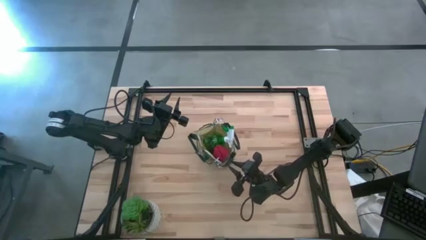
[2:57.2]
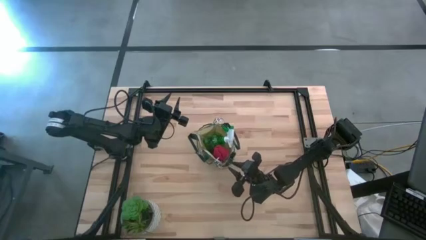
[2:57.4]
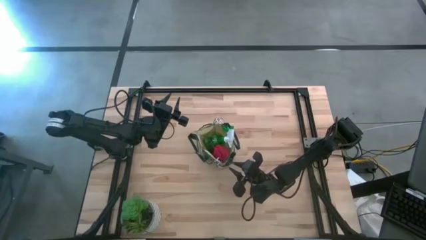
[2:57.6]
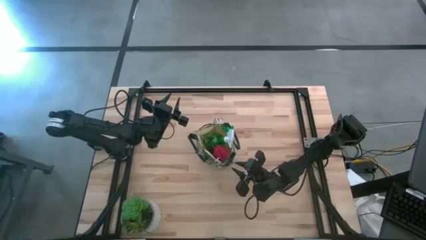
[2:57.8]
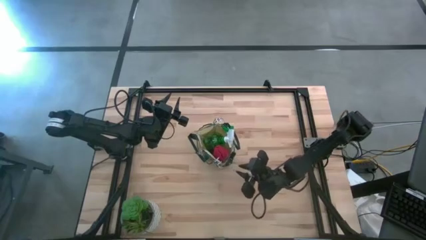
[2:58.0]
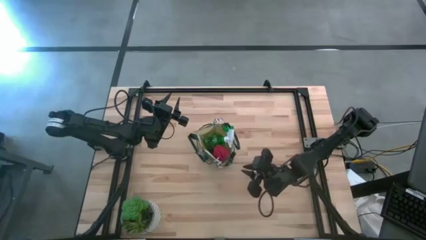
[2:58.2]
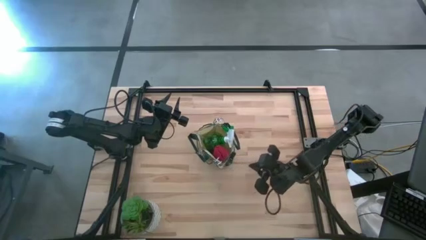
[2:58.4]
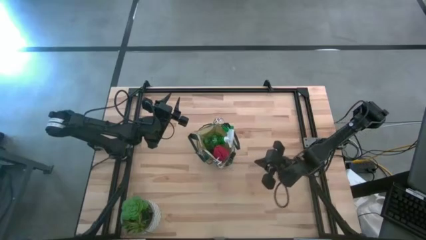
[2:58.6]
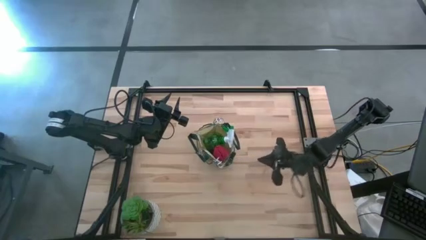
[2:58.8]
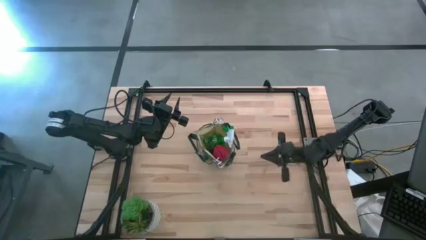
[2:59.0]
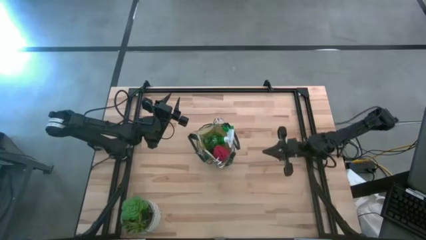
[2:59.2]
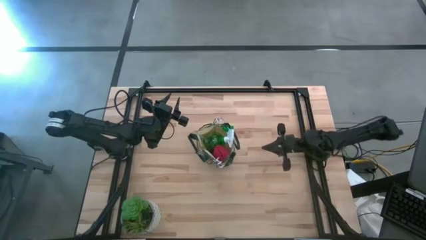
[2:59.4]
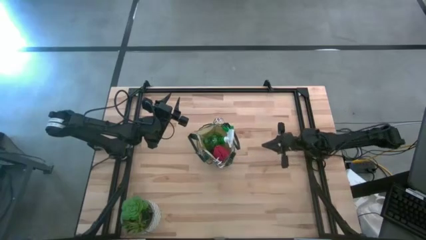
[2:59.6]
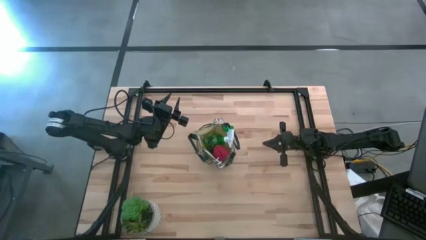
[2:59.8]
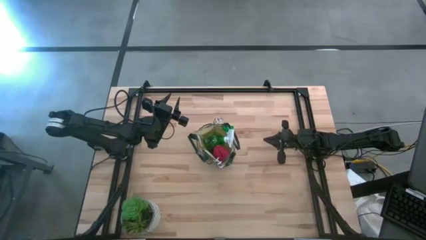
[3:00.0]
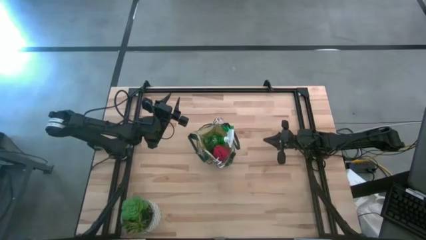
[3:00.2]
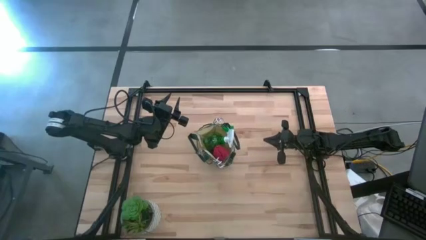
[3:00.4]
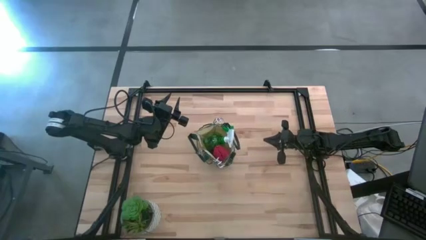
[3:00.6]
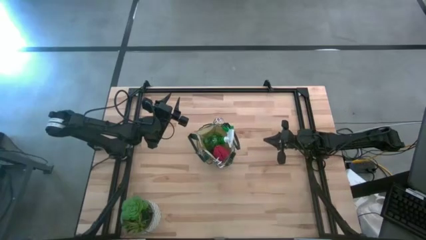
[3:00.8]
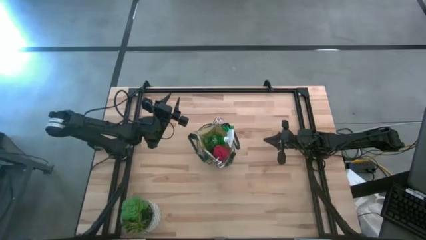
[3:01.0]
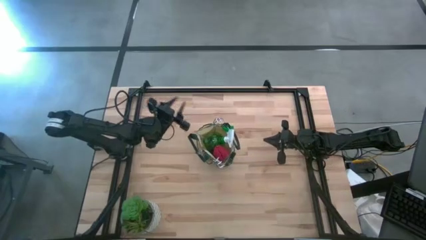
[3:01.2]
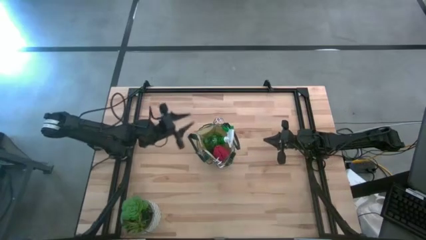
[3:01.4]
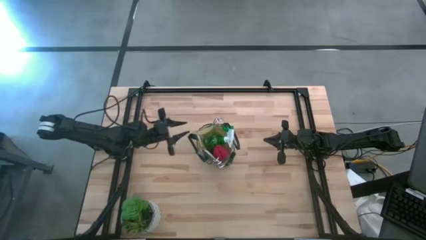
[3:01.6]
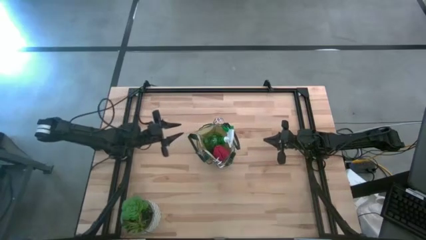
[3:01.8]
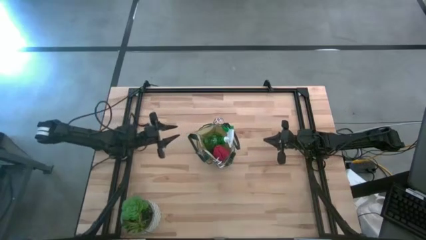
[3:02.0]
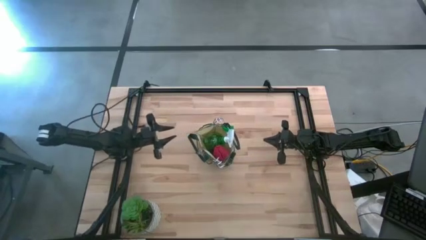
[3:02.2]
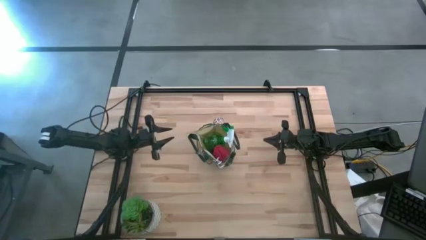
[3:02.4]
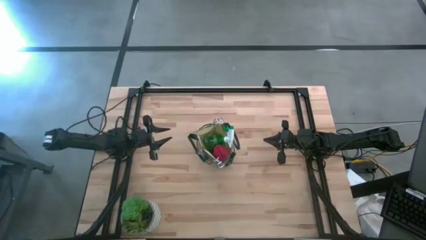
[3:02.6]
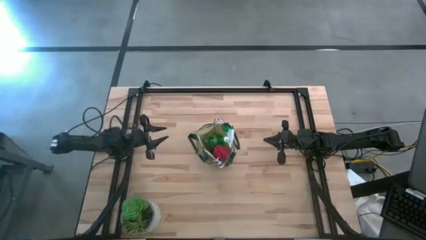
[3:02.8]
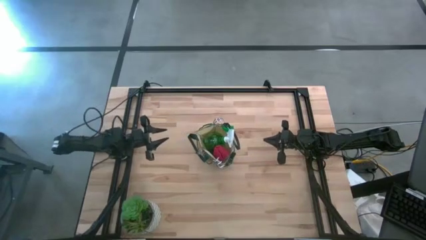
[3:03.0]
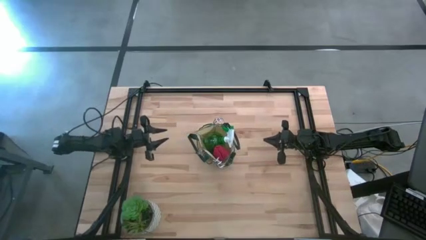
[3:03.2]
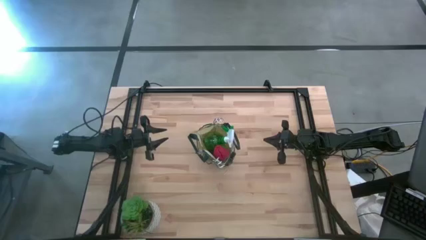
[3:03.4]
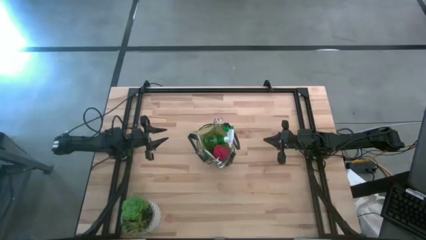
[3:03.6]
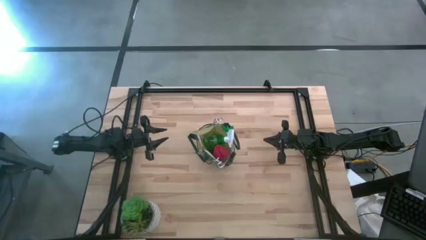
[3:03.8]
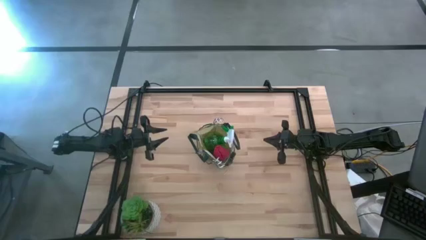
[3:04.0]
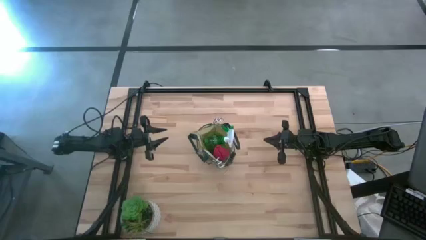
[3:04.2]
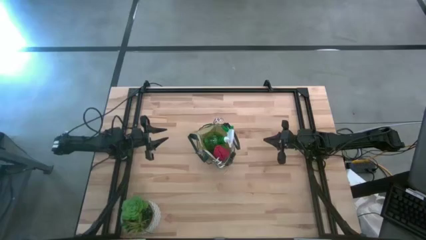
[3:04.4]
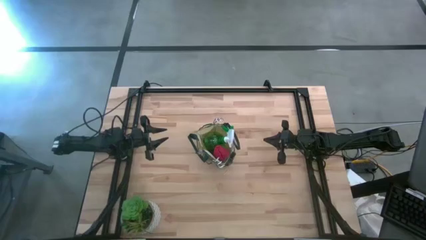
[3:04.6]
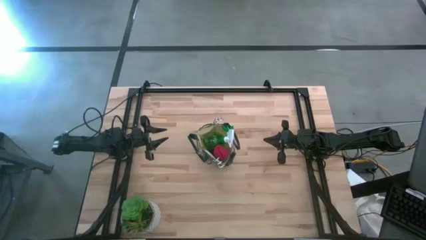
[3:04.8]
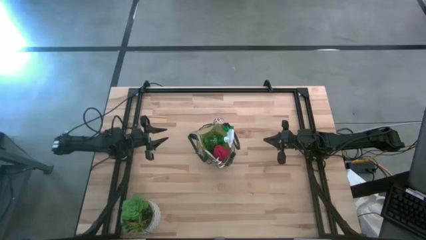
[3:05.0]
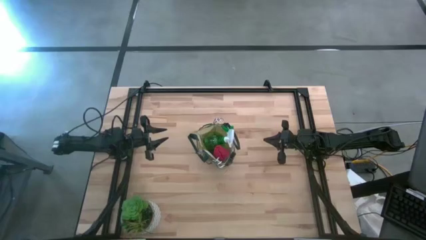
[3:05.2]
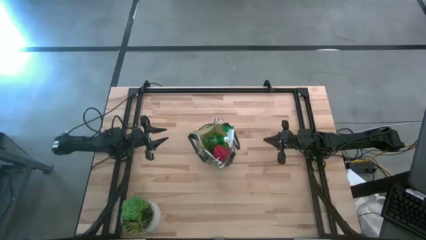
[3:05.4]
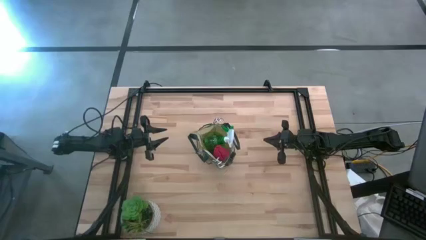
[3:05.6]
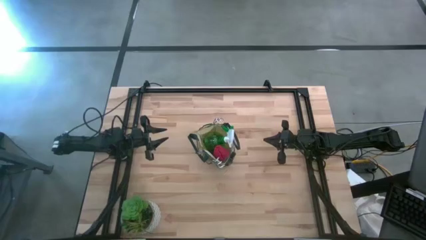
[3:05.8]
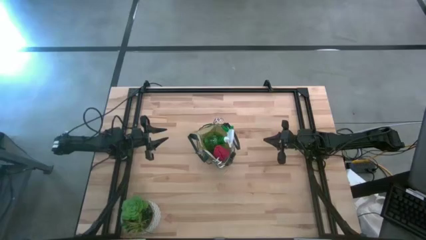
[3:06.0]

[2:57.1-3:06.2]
Task: Pick & Place Garden tools in Gardening bag
Return to Home Position
